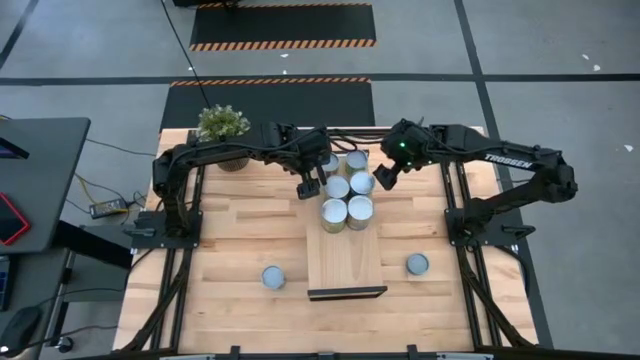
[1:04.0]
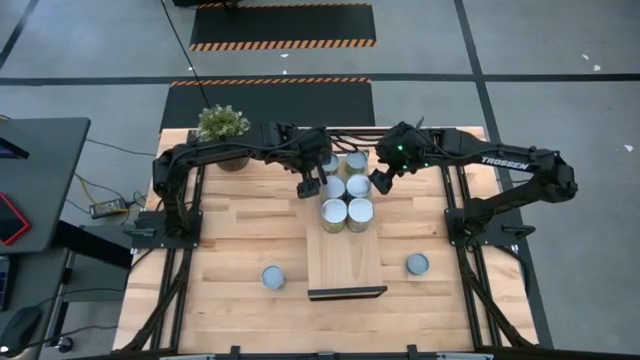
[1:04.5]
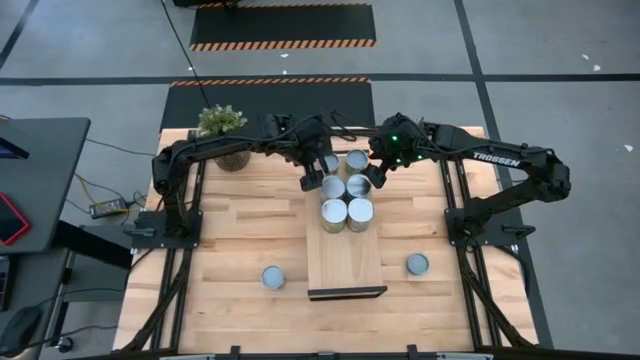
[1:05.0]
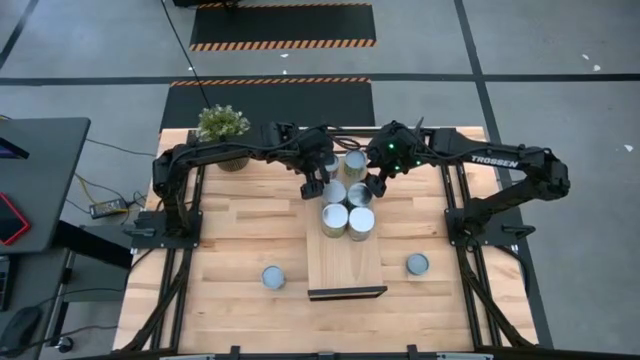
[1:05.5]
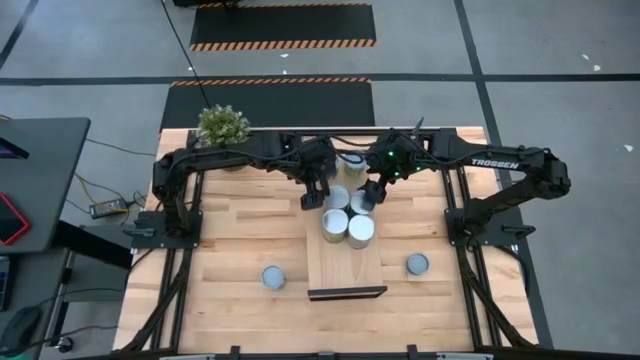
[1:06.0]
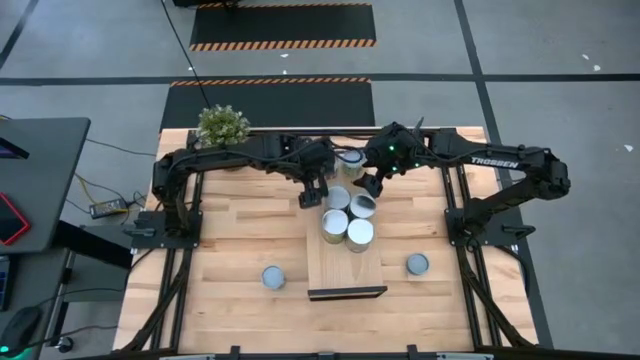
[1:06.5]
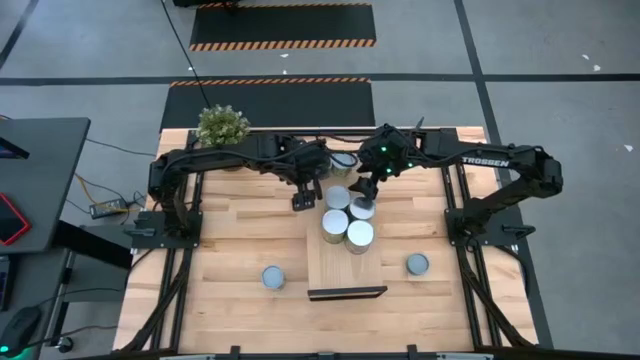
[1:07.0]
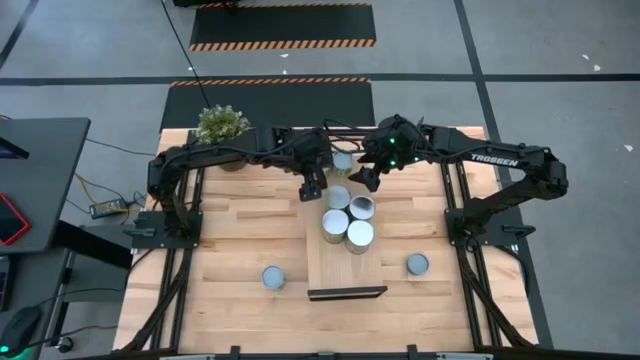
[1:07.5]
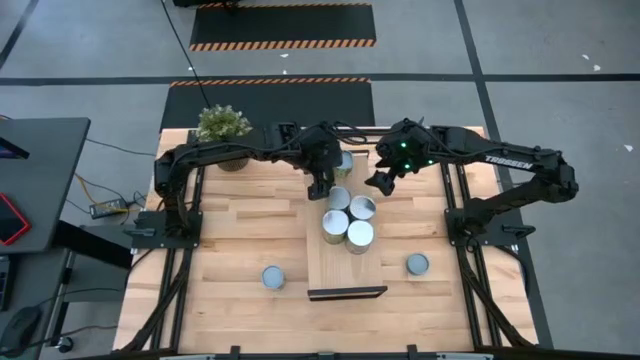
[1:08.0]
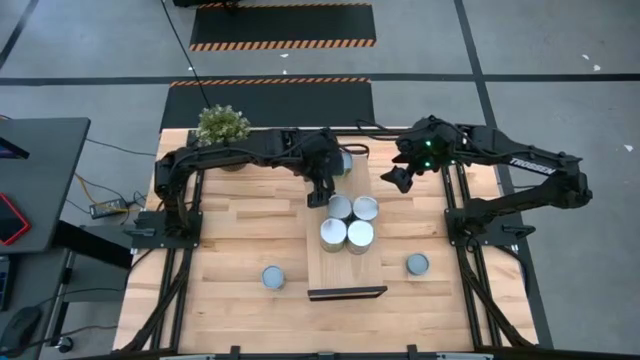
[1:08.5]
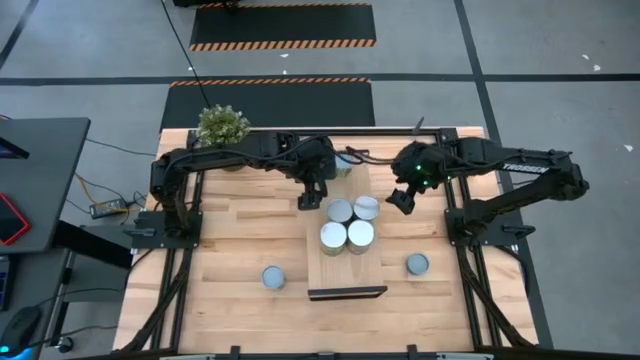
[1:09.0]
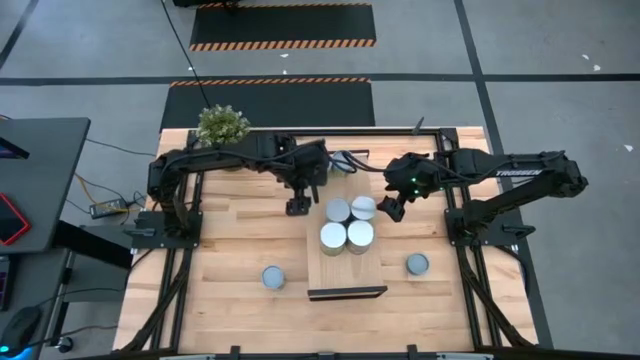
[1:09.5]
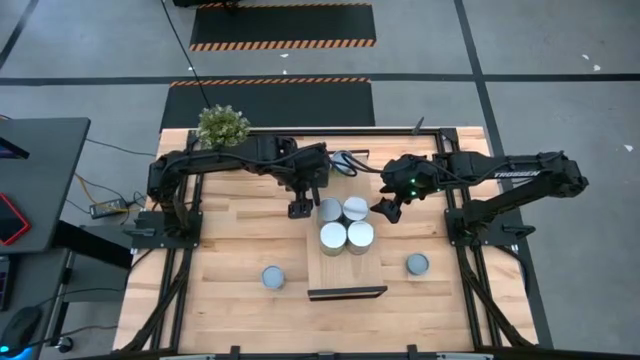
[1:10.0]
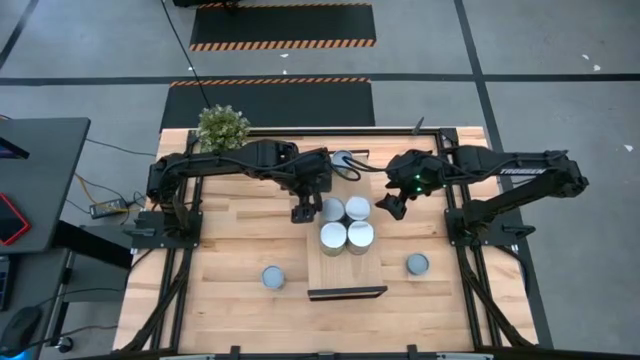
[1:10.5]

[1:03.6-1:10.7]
Task: Pick and place cans onto a shelf
Adjust the cans on the shelf

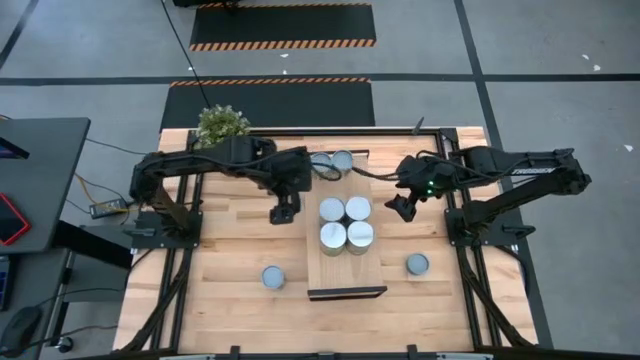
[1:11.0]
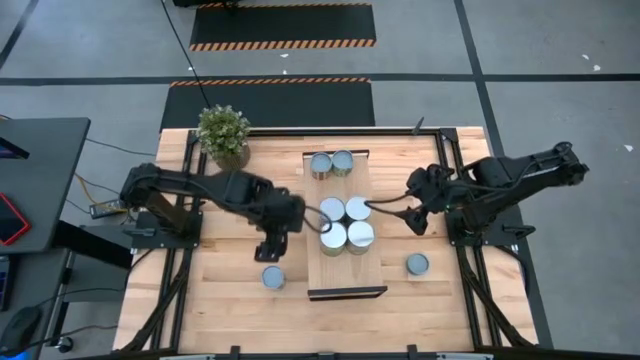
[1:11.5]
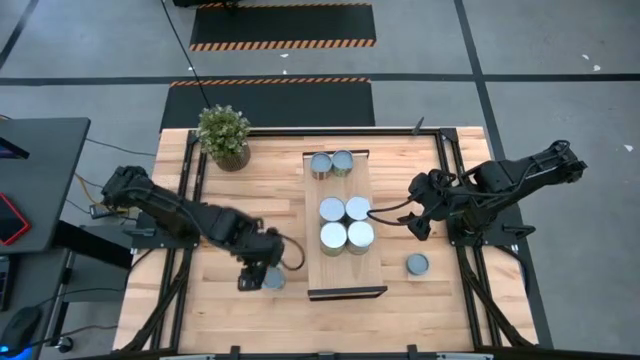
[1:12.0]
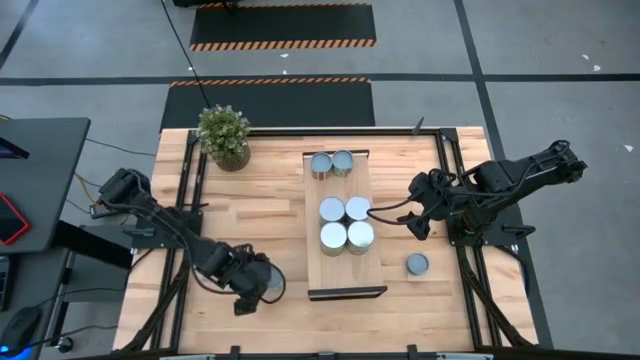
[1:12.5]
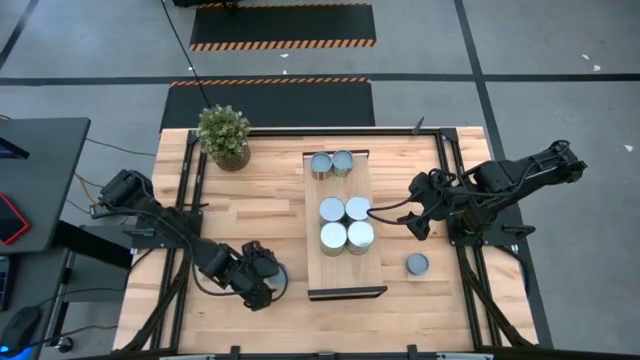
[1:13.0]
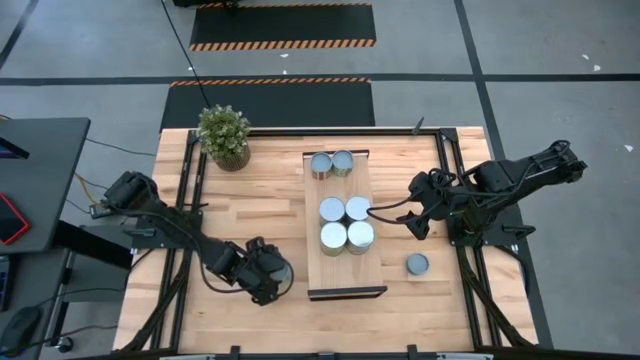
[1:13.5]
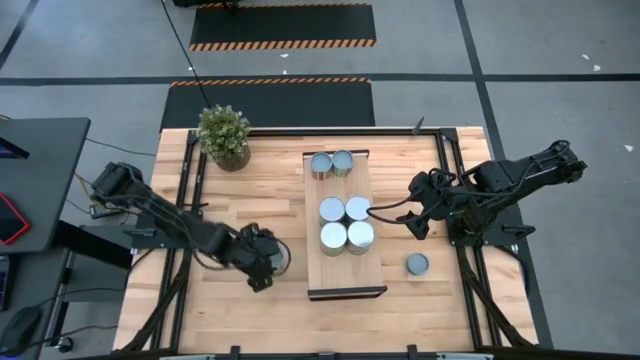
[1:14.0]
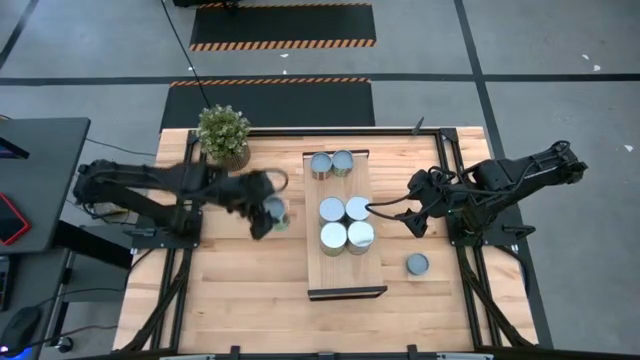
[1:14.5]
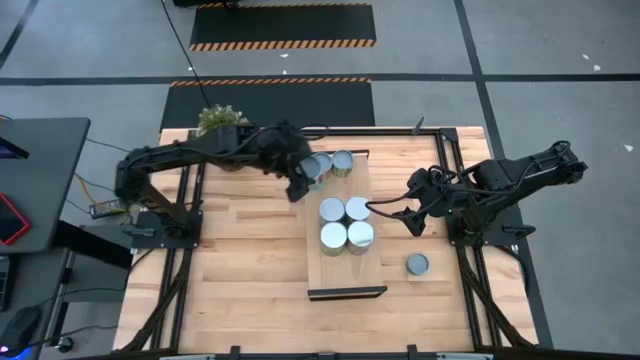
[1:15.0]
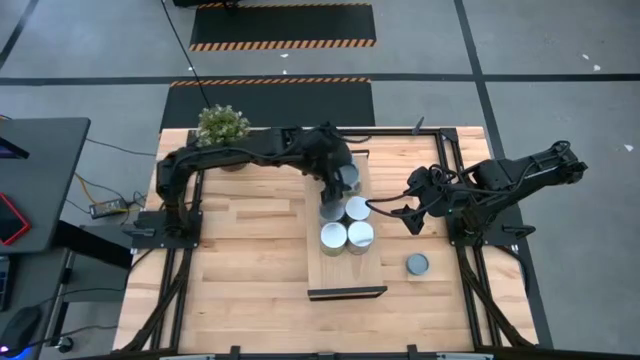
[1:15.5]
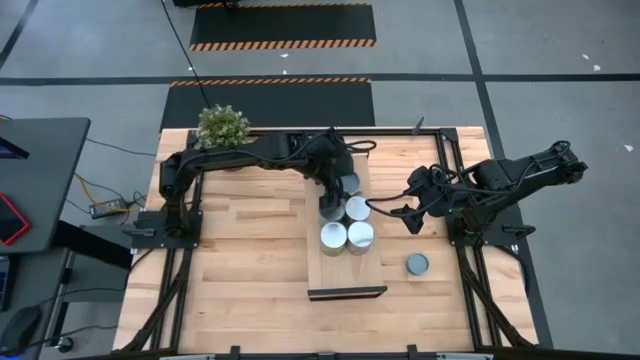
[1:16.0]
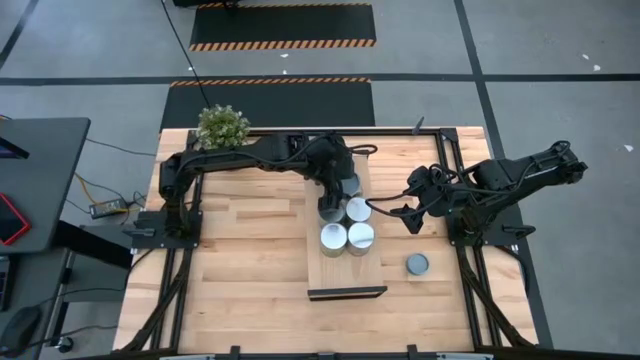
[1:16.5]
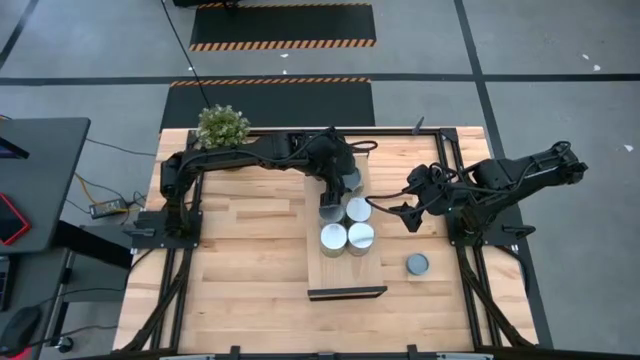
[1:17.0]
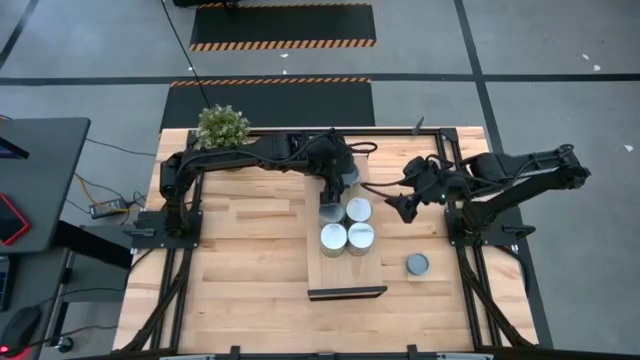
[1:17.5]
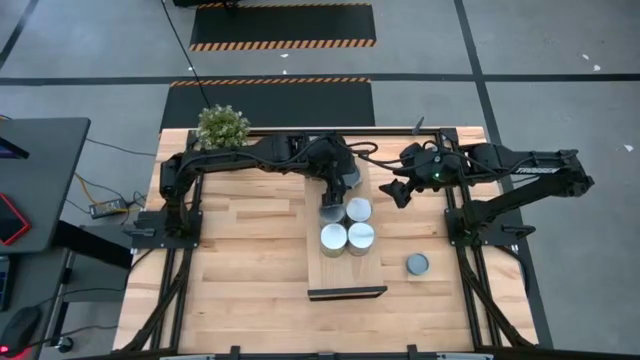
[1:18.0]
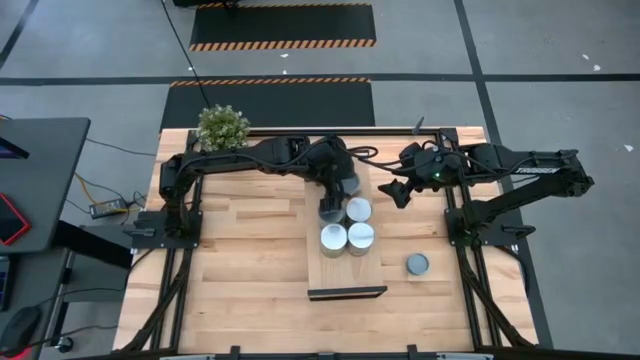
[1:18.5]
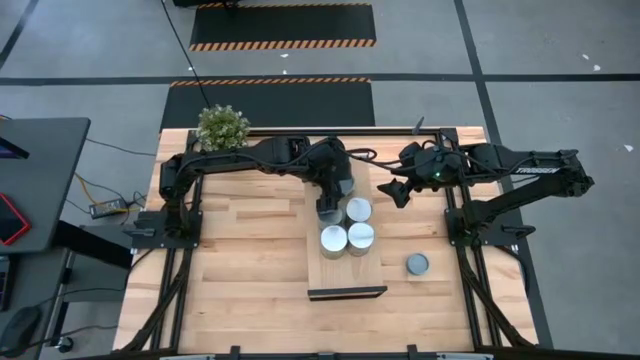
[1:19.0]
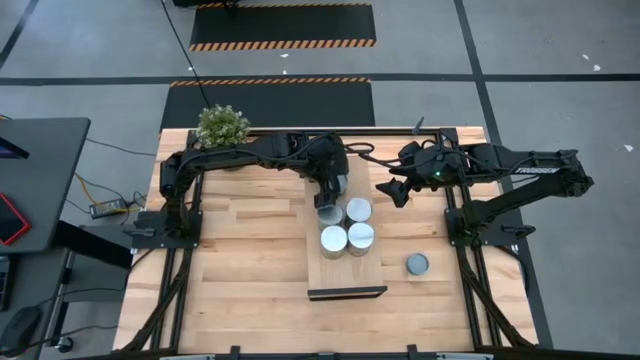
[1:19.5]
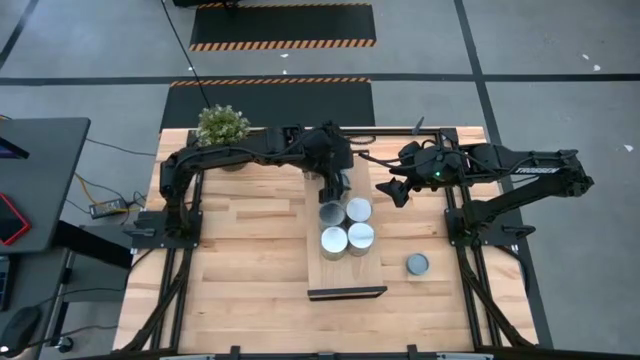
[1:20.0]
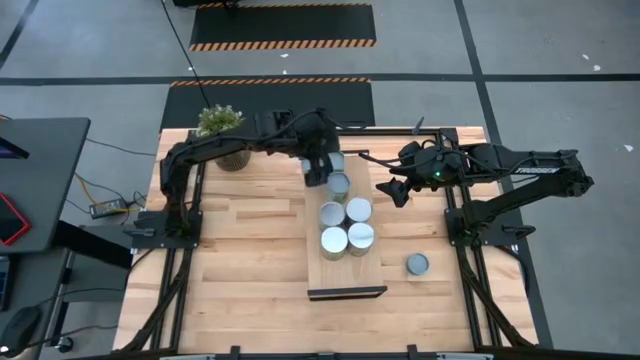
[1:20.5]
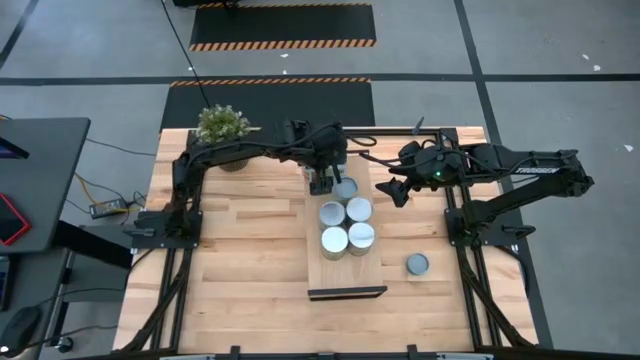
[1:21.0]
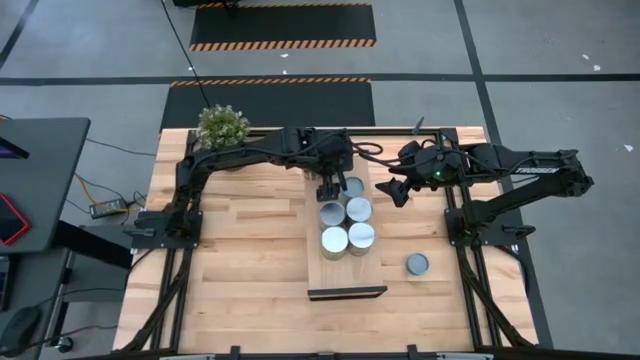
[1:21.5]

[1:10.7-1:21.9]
Put the canned mixed vegetables on the shelf

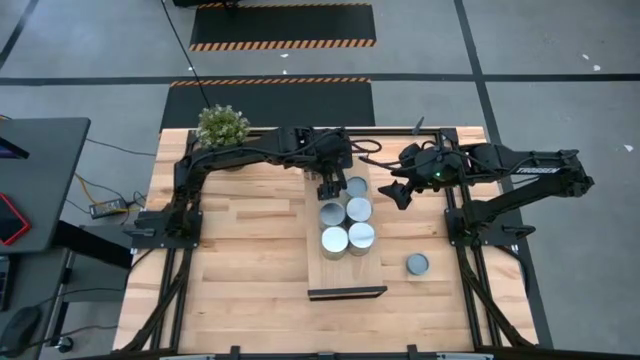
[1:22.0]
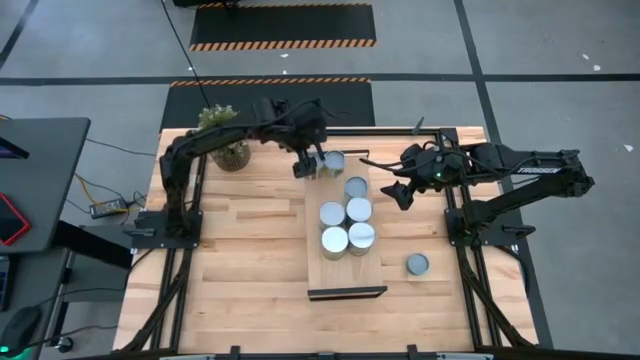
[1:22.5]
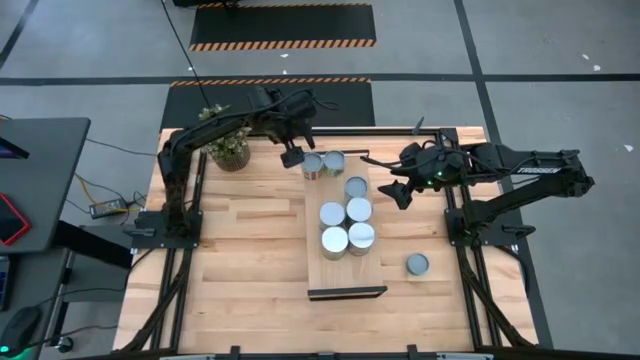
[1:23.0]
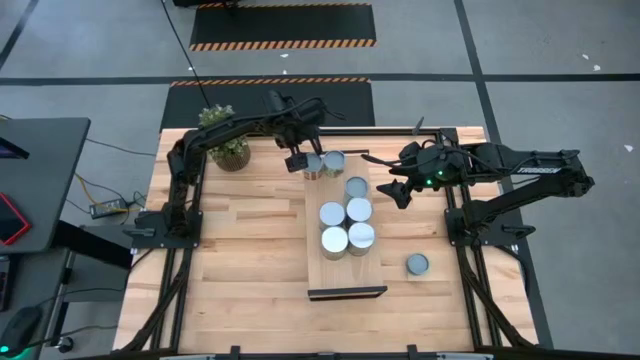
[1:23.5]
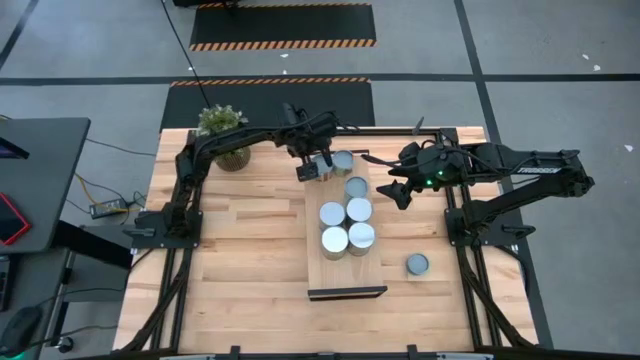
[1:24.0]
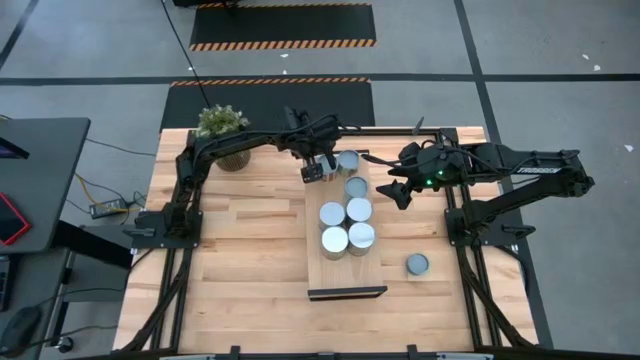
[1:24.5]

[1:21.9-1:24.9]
Adjust the cans on the shelf
